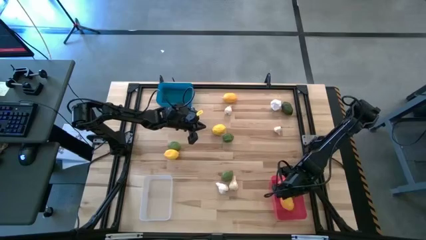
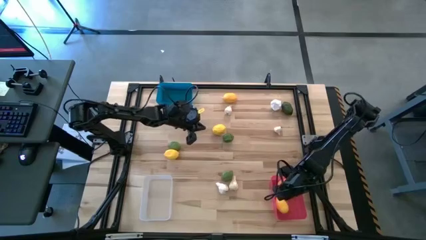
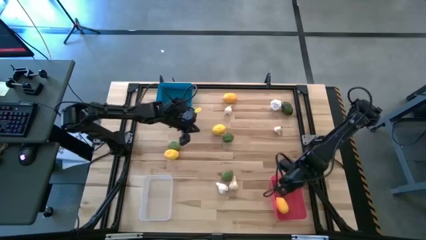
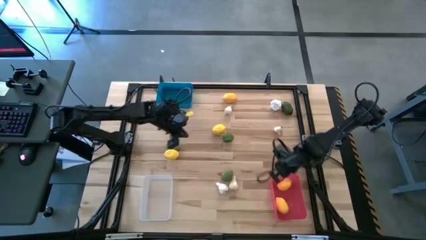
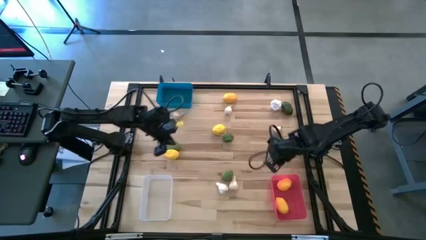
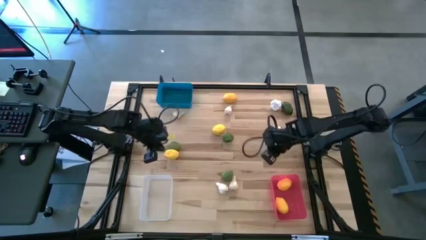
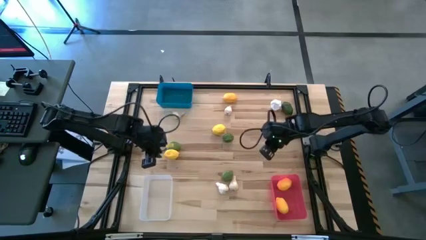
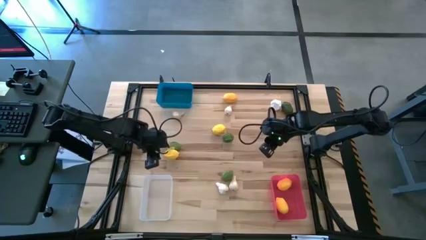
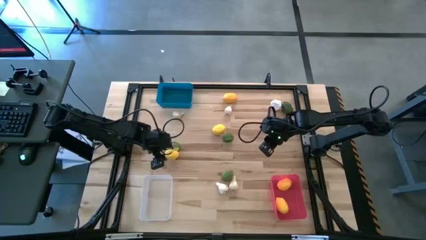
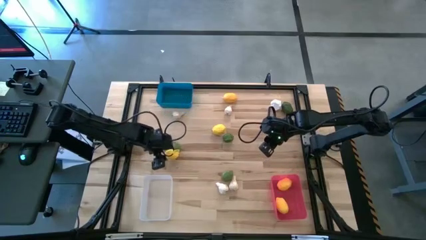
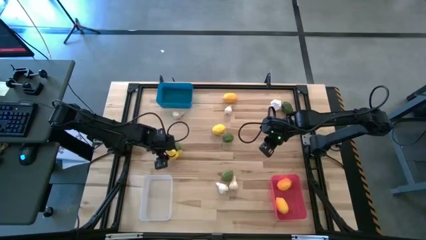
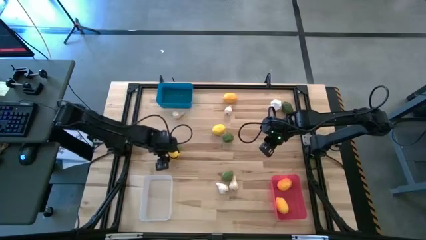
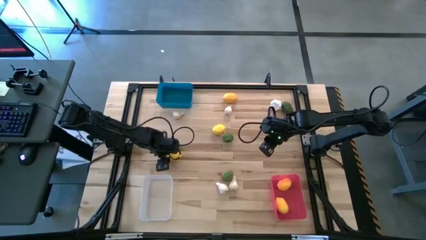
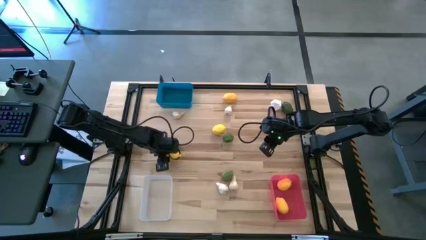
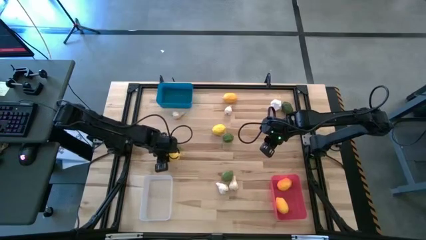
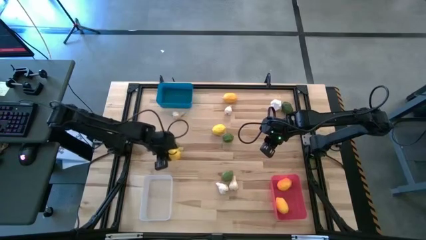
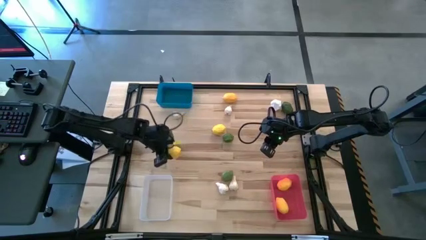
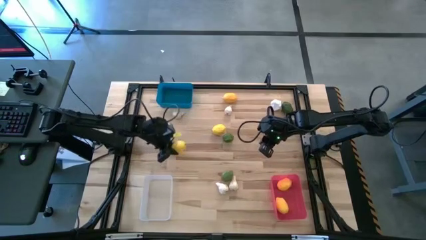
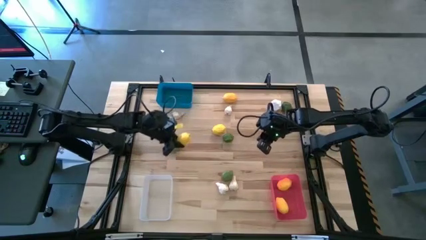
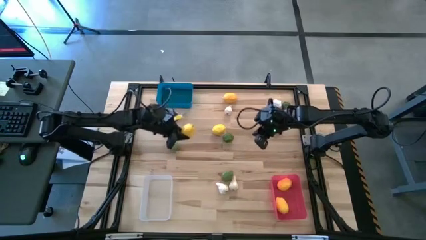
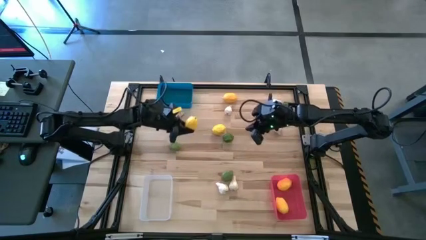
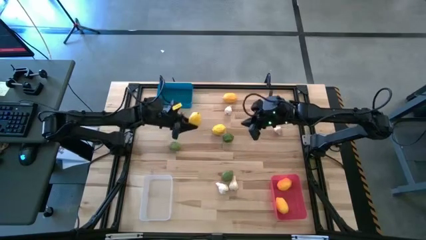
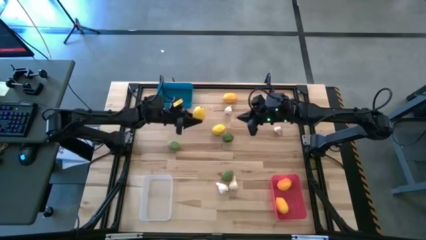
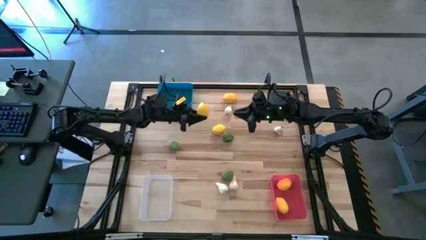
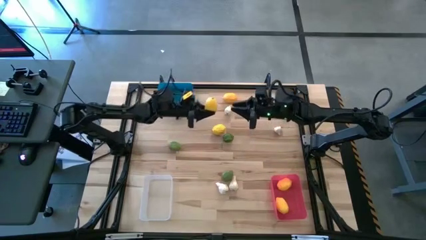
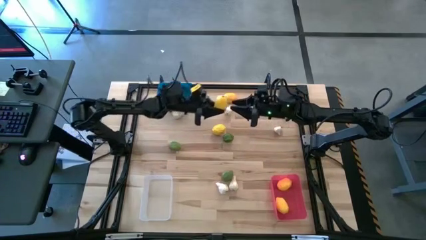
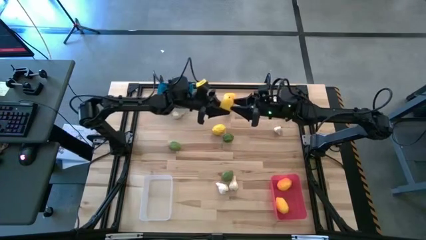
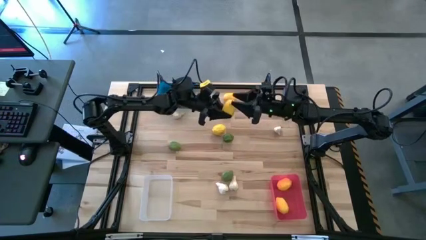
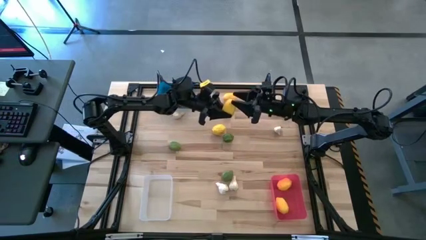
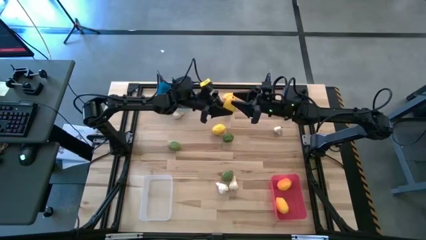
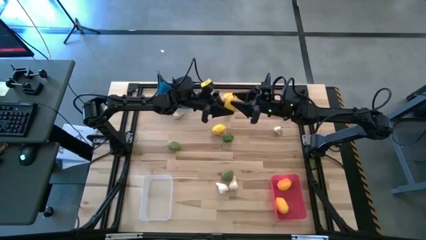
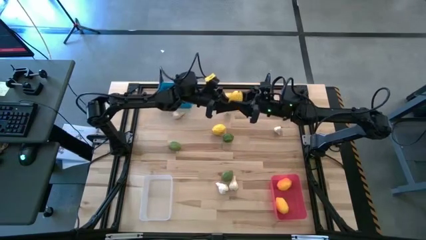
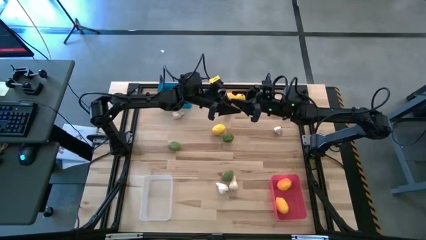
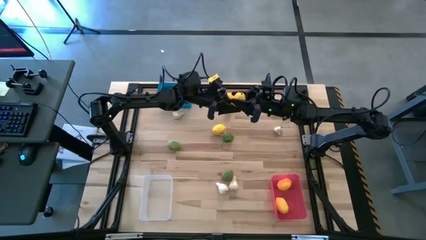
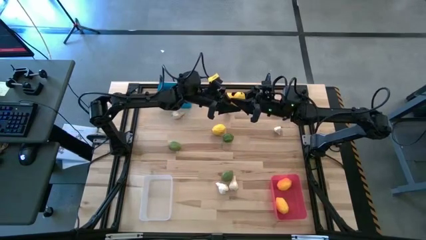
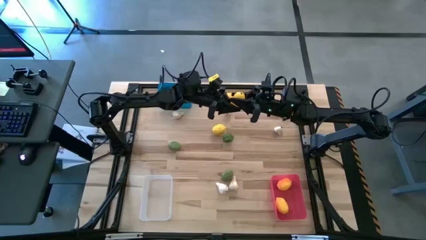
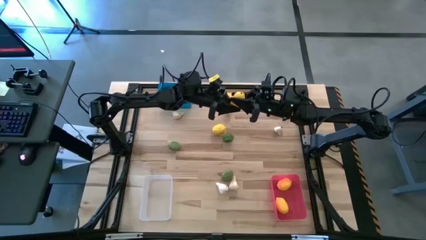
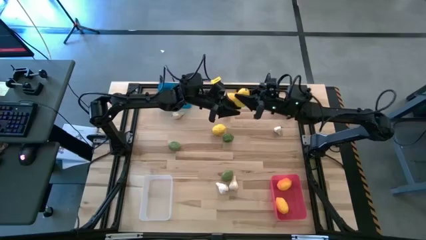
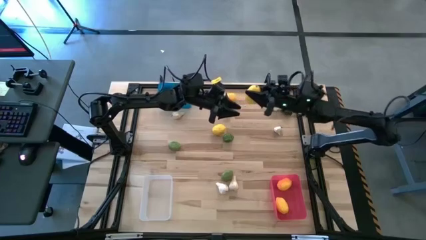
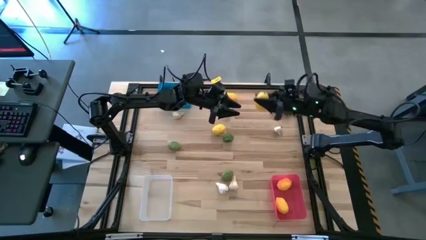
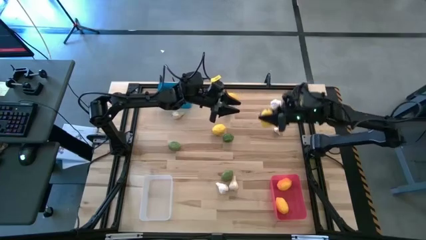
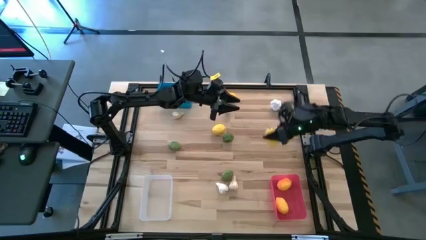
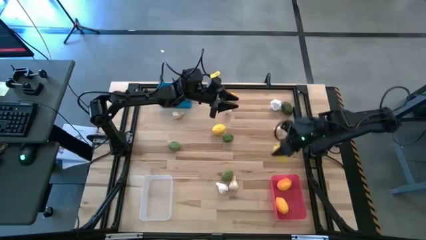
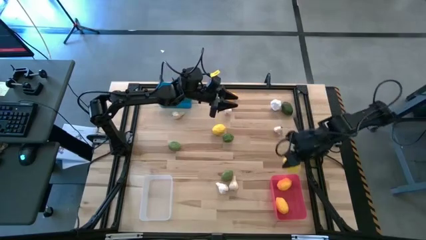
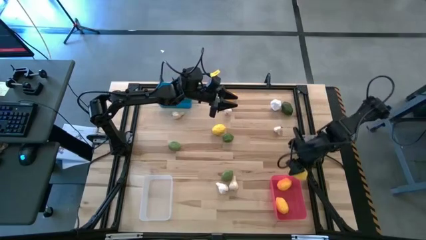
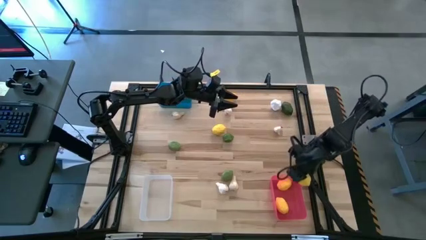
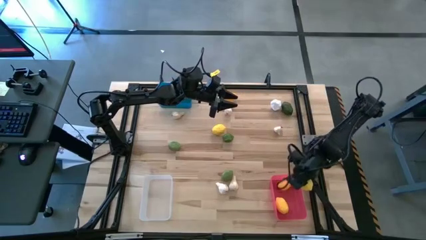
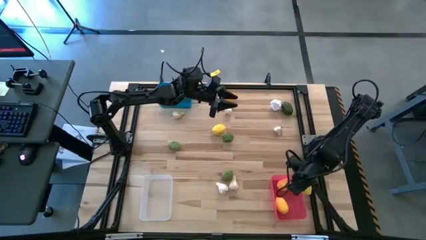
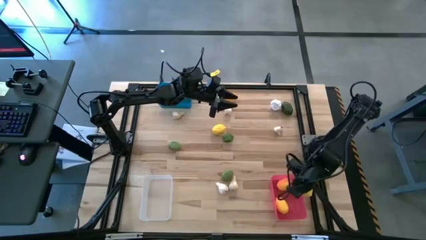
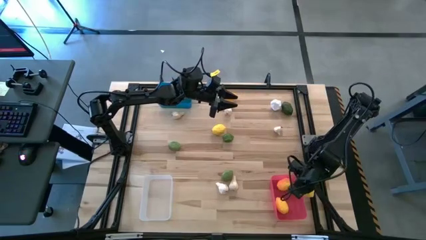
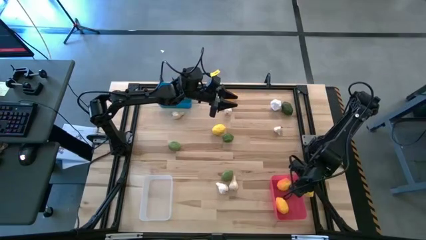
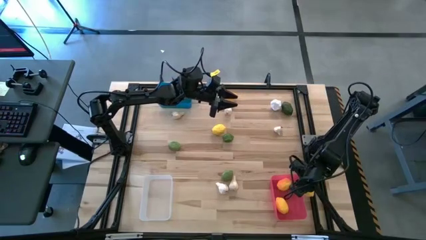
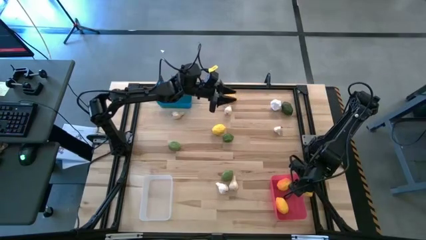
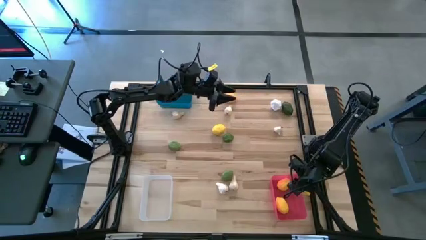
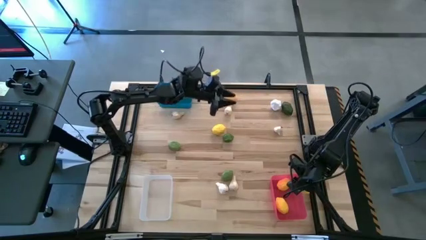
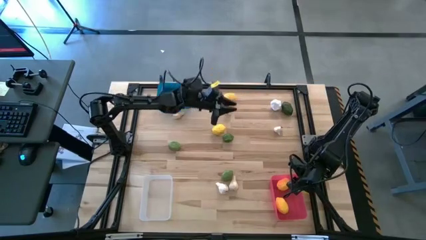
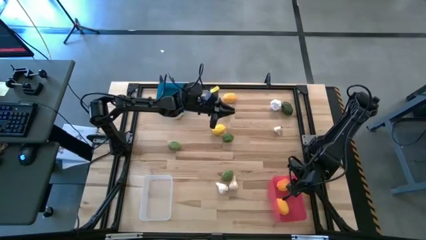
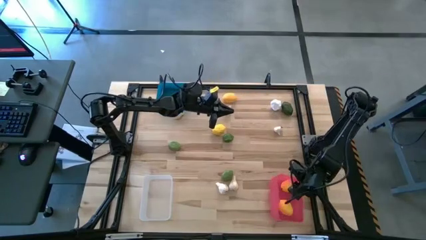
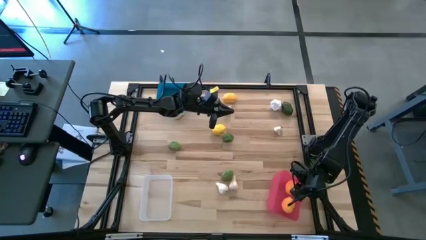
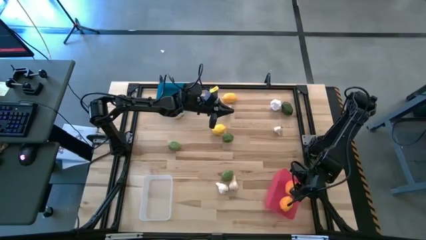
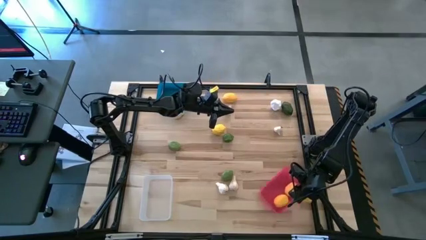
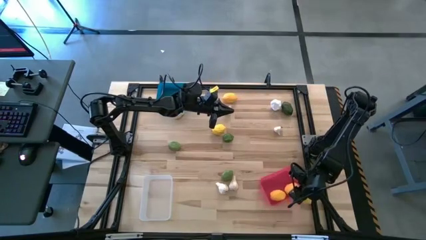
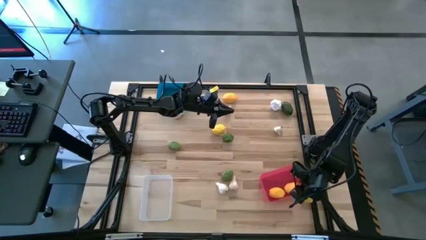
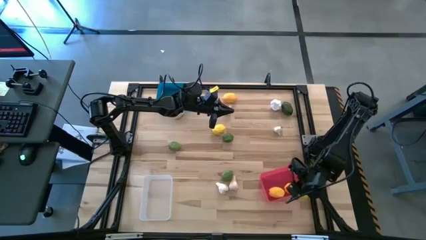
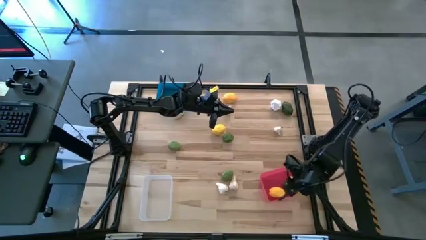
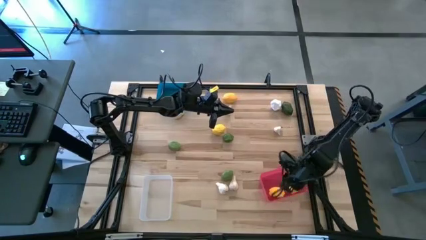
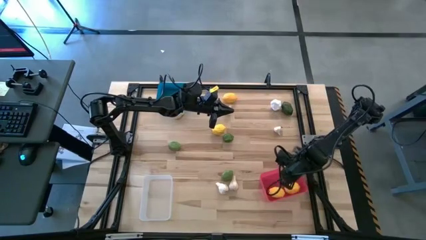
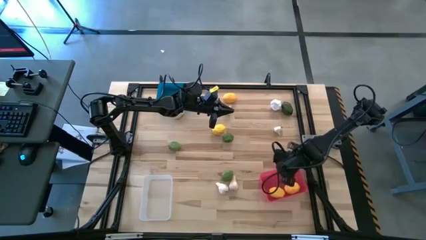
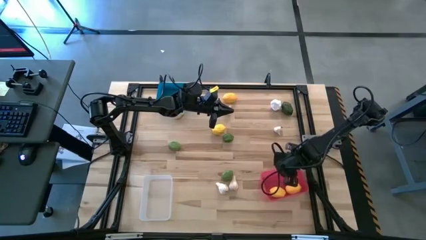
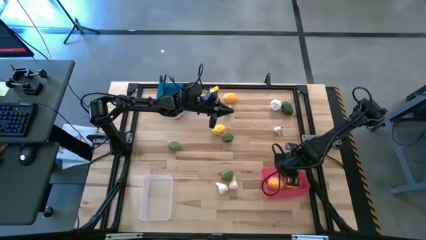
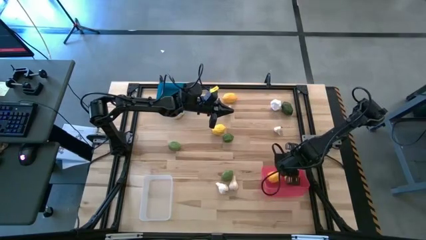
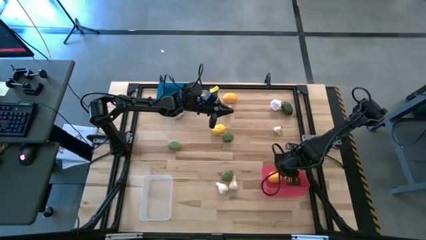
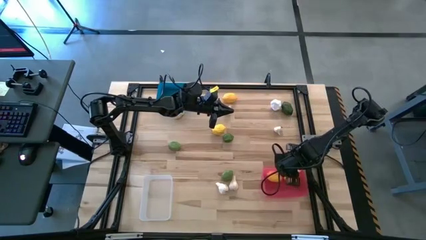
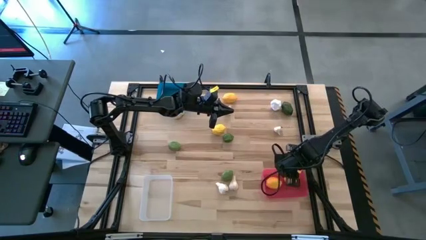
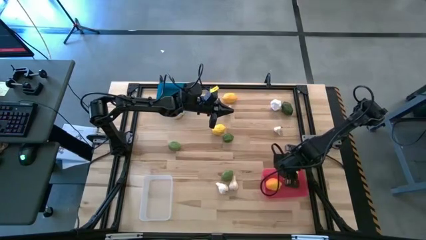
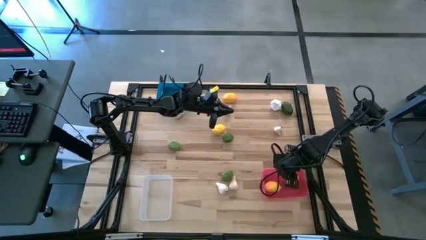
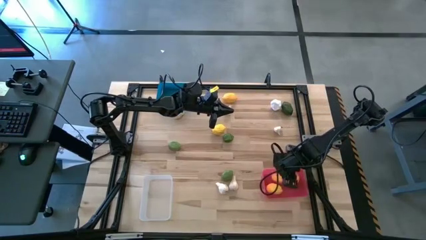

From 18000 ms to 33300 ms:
Task: Sort produce into baskets
Put the lemon into the red bin
